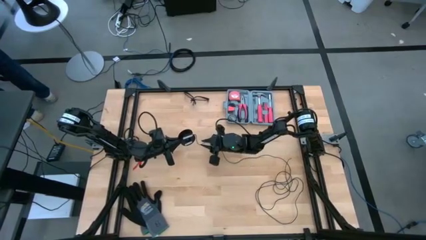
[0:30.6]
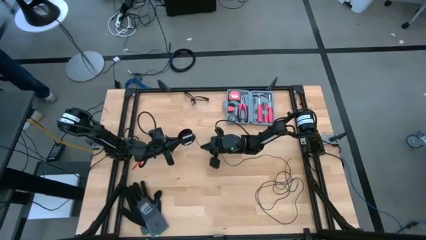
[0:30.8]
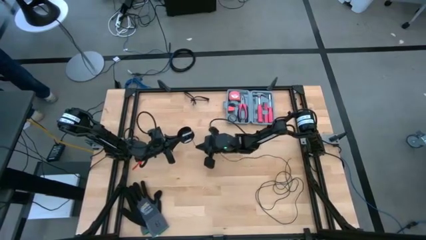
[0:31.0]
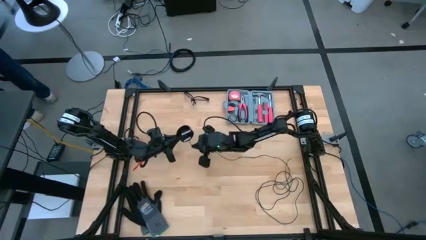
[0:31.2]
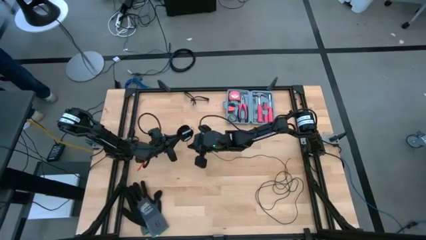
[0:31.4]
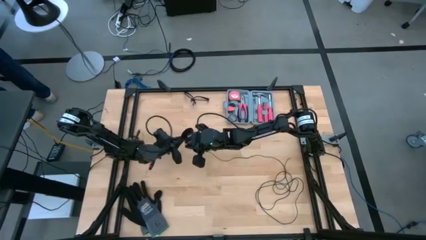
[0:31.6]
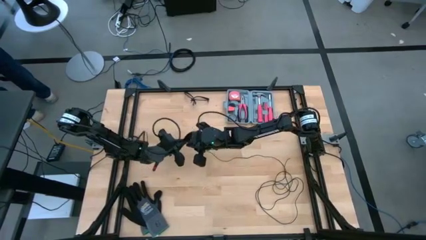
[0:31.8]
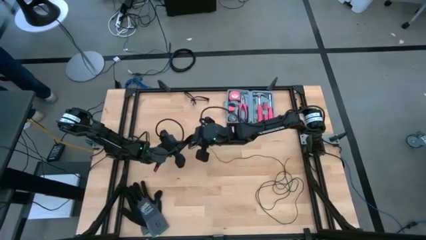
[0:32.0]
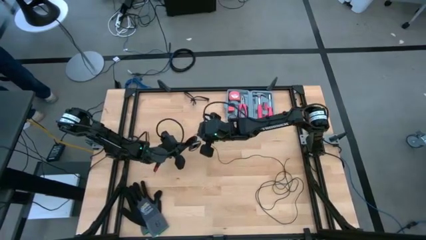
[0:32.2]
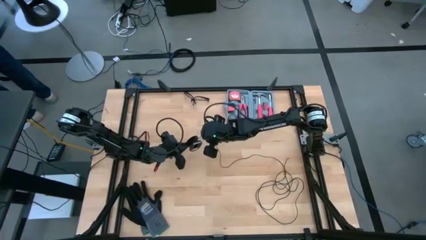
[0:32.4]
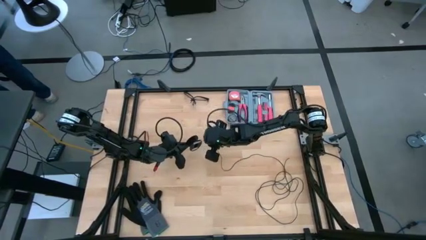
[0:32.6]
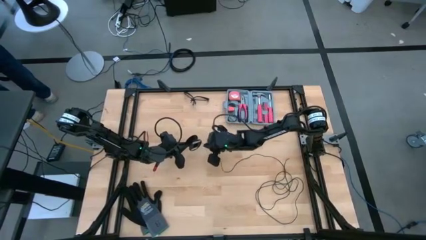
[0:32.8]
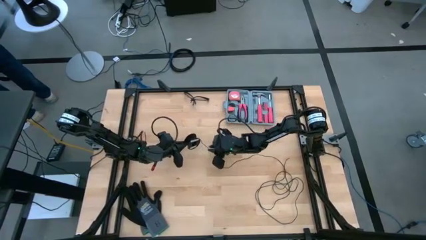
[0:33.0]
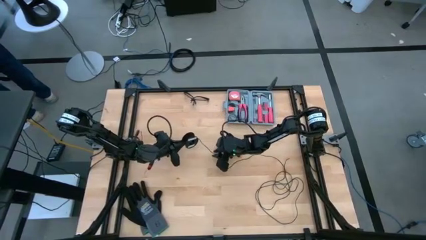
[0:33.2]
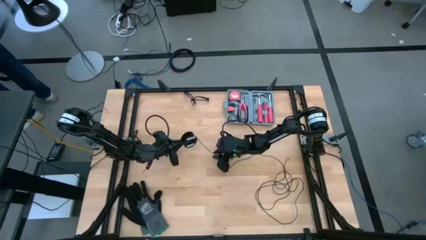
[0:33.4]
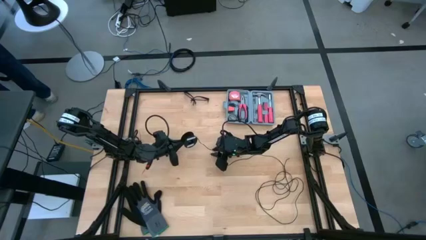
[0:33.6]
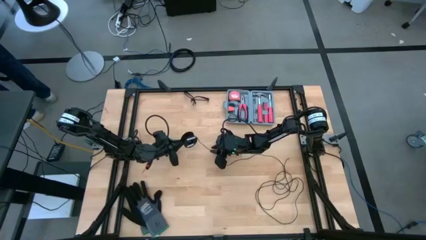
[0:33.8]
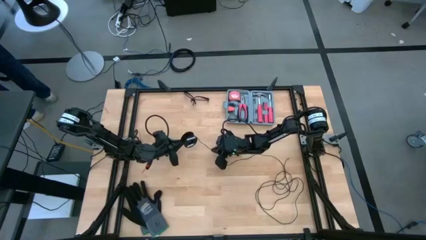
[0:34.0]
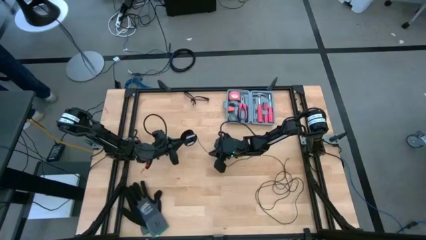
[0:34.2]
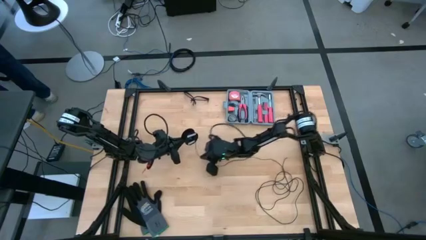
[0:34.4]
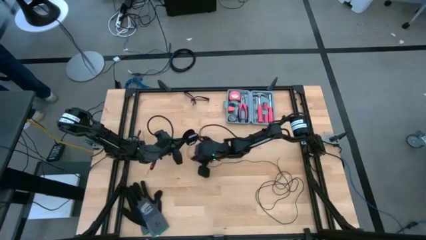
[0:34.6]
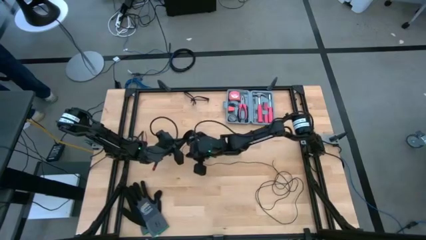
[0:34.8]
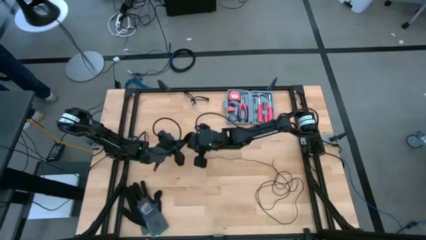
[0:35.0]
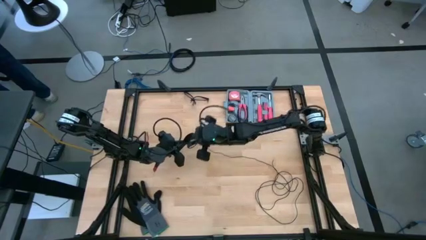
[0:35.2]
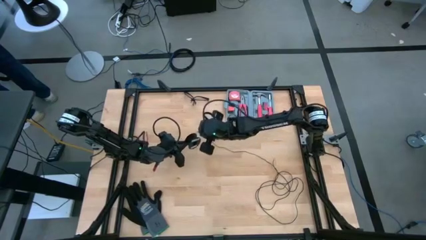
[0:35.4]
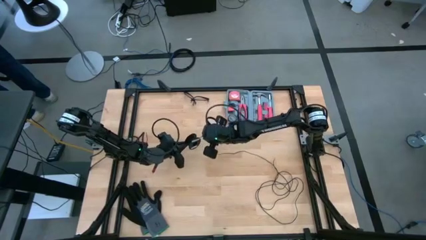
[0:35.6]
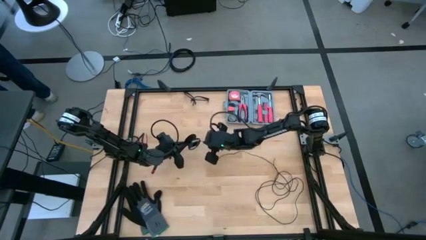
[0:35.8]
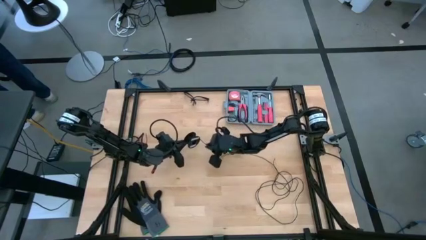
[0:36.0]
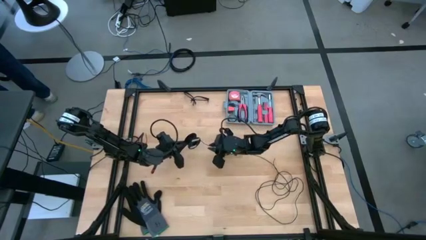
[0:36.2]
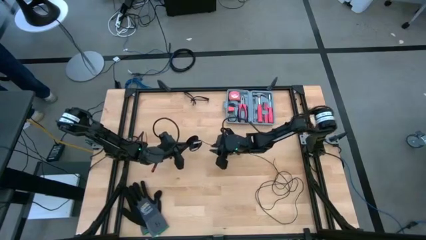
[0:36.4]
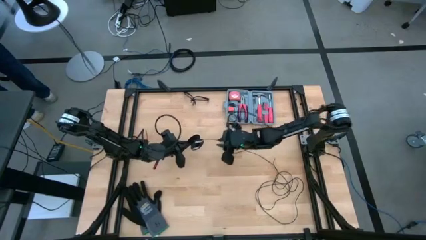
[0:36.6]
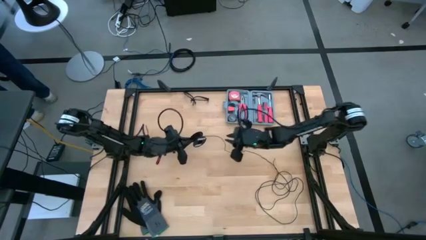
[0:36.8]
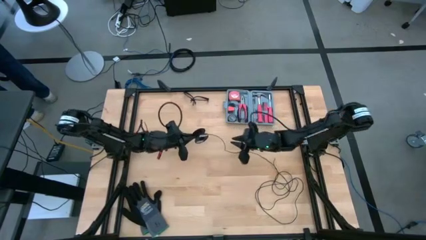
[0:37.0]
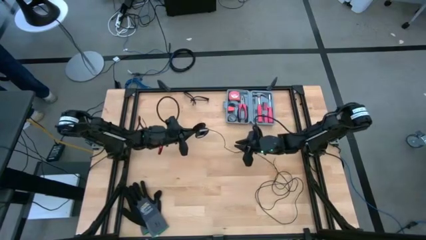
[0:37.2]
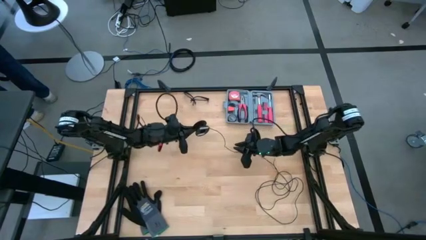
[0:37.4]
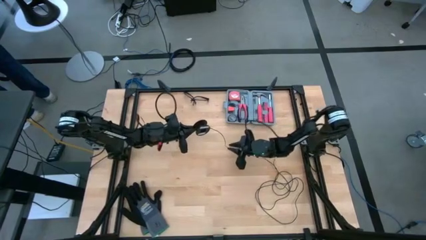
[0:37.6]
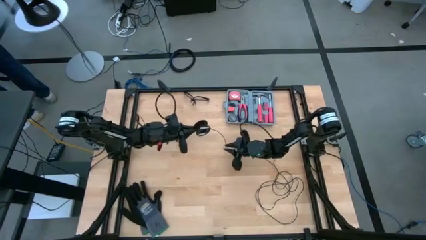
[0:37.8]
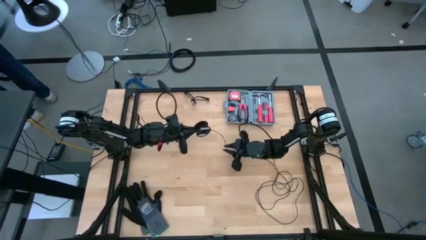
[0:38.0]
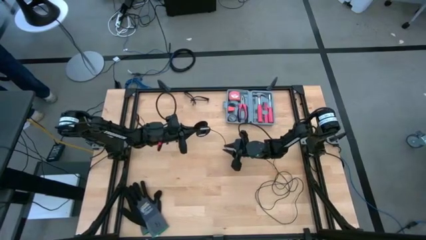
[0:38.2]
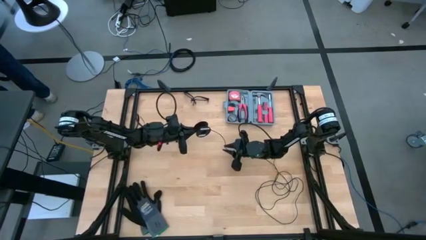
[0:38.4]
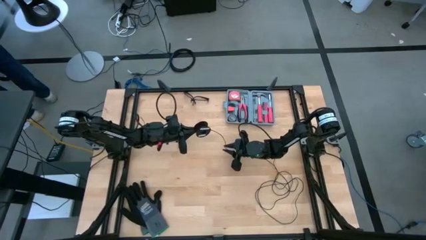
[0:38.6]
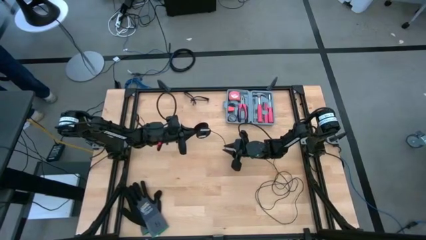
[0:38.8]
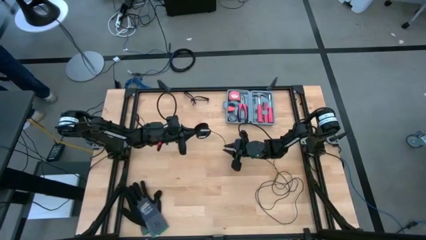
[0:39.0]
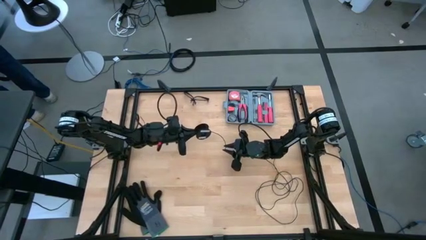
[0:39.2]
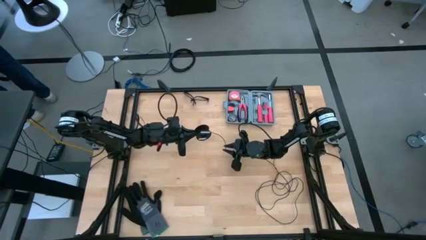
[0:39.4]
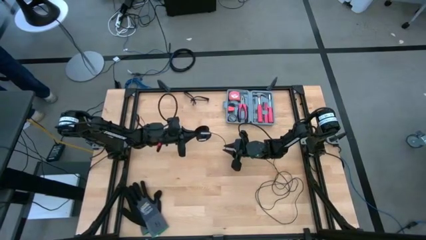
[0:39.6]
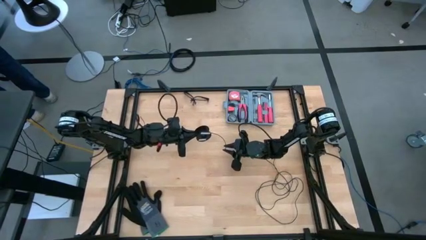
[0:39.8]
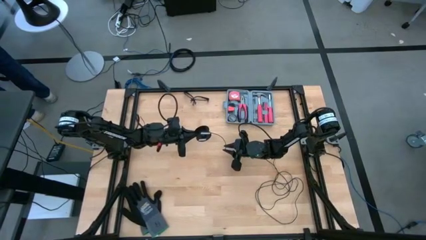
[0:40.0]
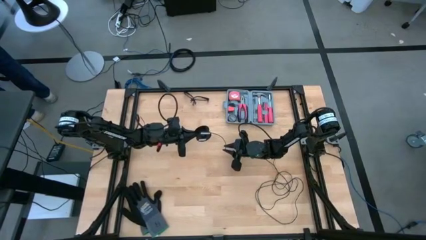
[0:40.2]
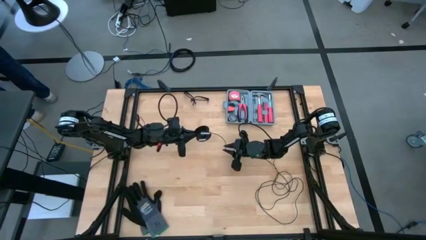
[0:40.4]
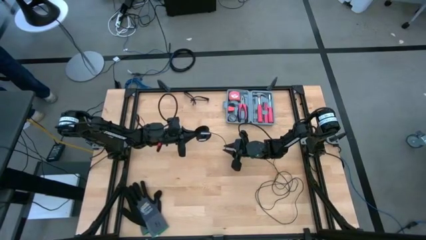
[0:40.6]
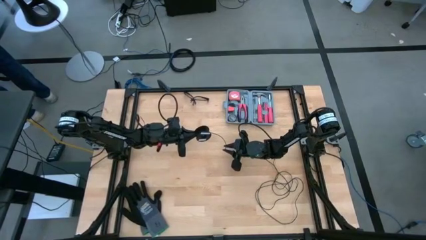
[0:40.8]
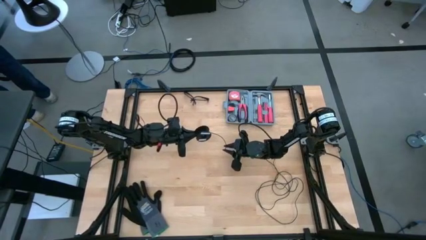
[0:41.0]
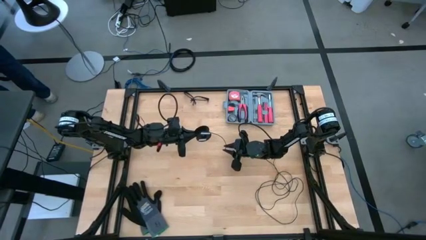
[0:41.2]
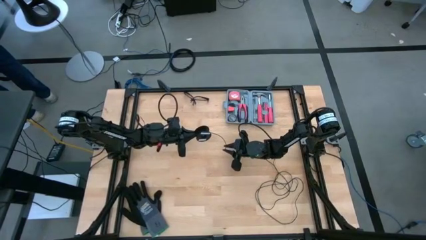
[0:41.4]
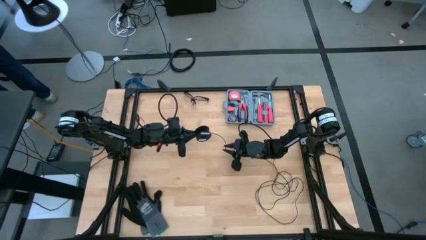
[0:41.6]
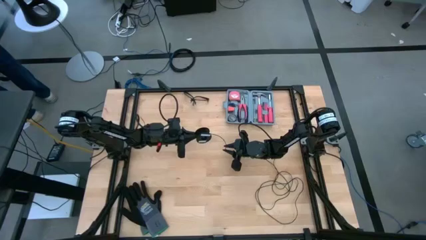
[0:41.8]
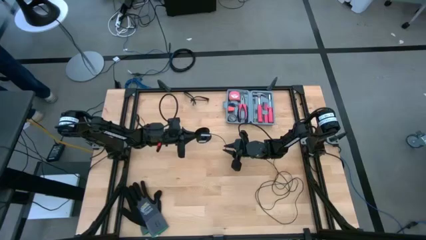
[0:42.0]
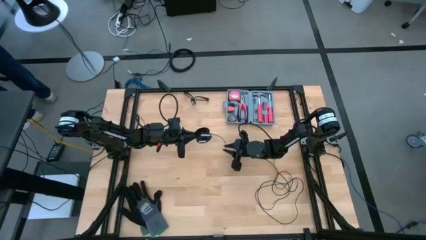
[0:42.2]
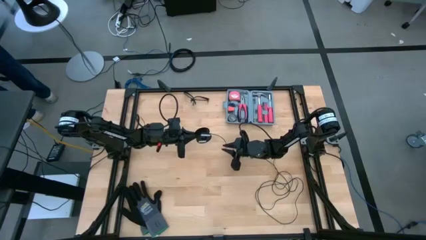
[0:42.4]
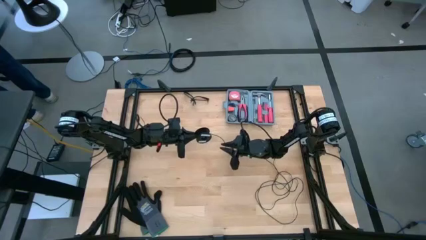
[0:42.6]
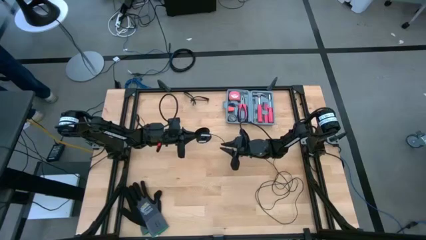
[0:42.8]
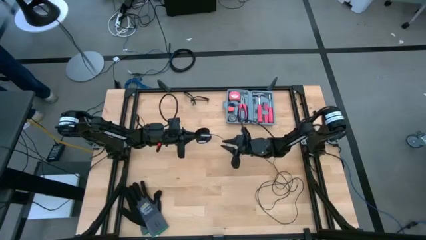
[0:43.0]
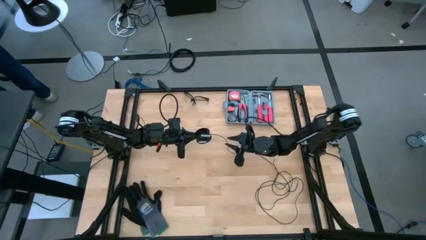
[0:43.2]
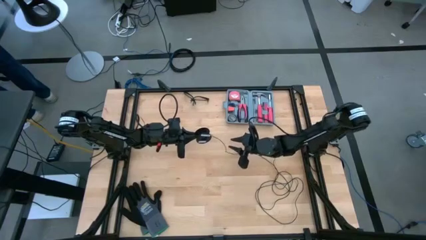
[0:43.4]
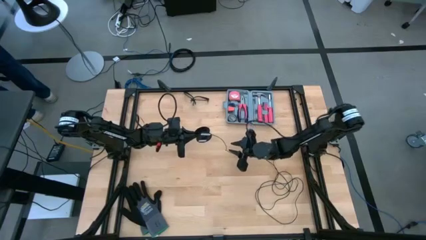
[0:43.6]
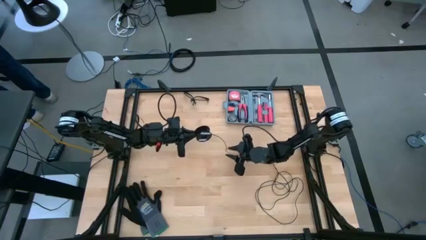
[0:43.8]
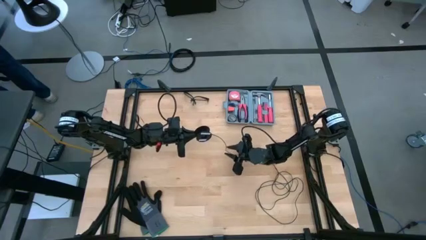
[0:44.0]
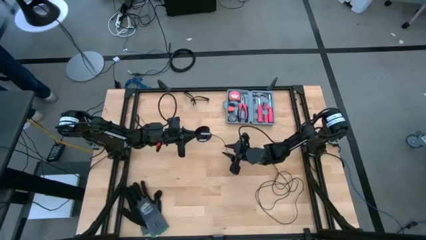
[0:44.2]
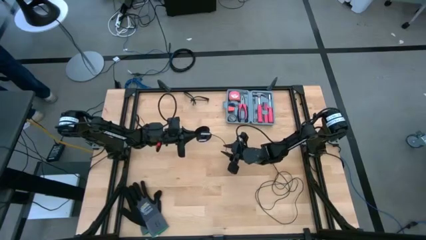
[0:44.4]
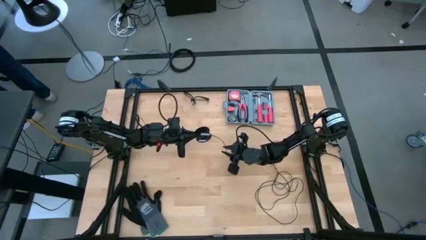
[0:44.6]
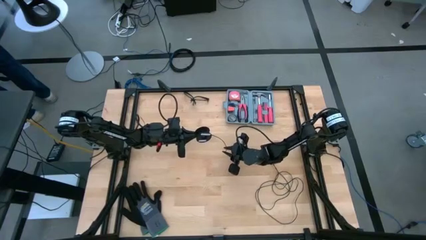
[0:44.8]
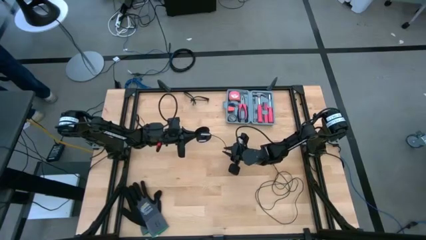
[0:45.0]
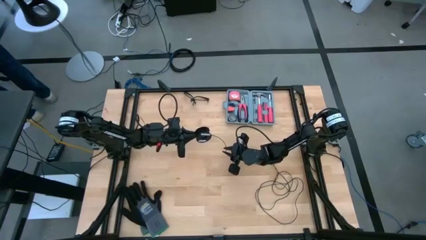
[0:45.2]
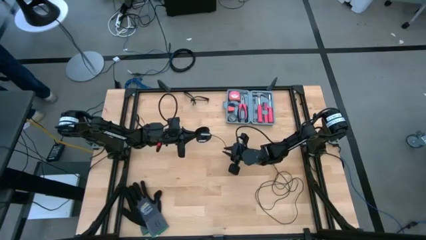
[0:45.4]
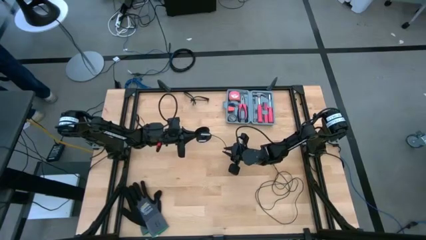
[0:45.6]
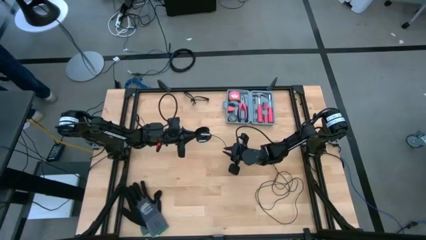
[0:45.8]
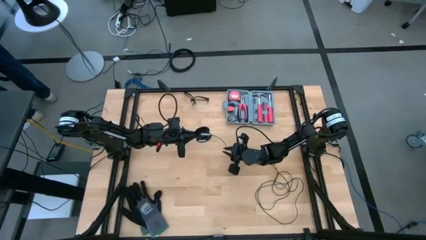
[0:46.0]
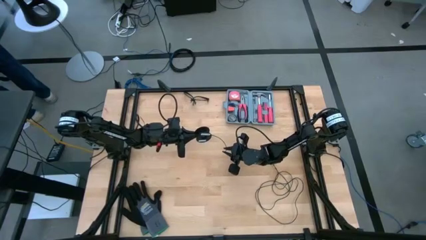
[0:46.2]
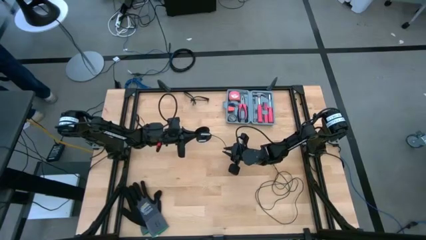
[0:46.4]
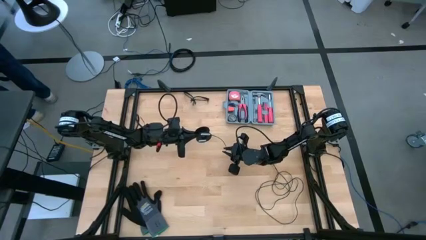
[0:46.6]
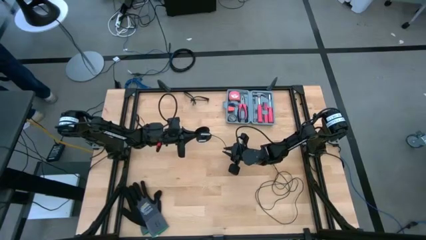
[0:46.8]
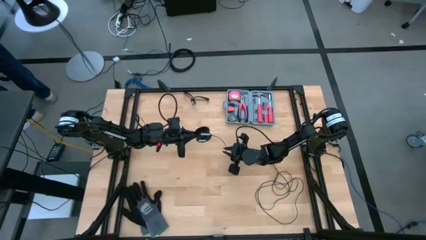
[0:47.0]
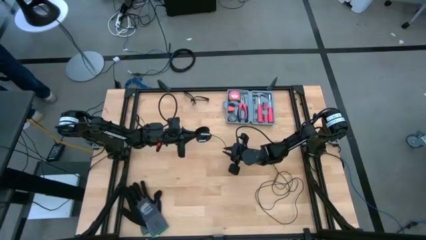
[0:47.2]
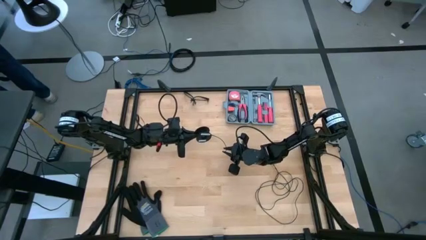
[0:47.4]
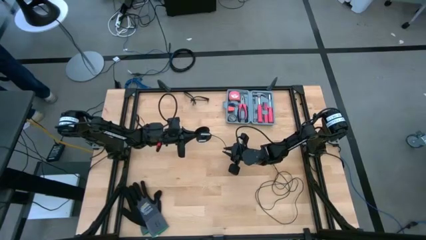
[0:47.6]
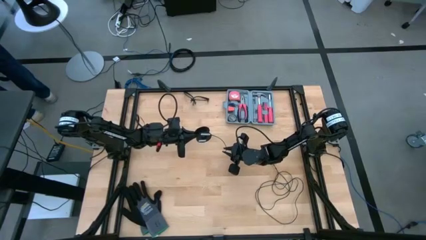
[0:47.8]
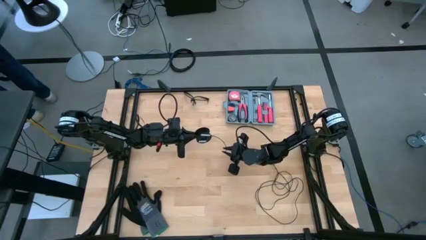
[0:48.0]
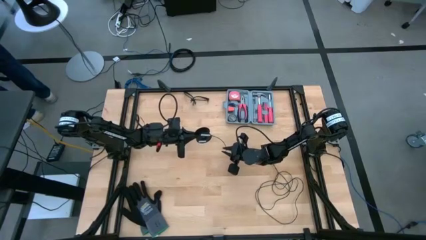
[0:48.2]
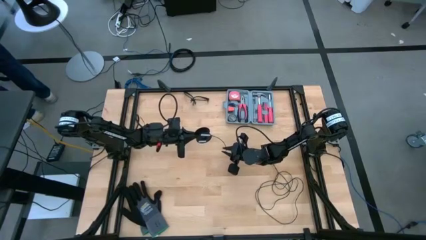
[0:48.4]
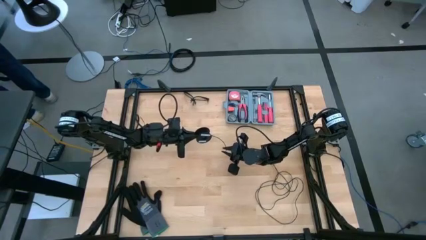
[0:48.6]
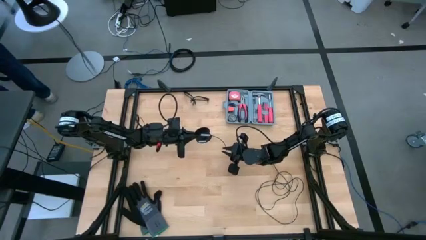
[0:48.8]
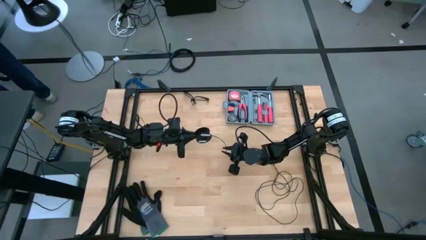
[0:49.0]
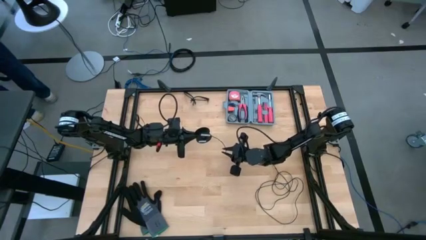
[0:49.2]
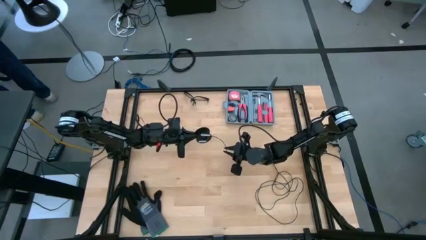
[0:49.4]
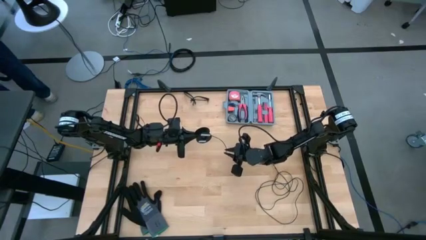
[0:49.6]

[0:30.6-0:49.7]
Task: Coil cords
Coil the black wire onto the spool
